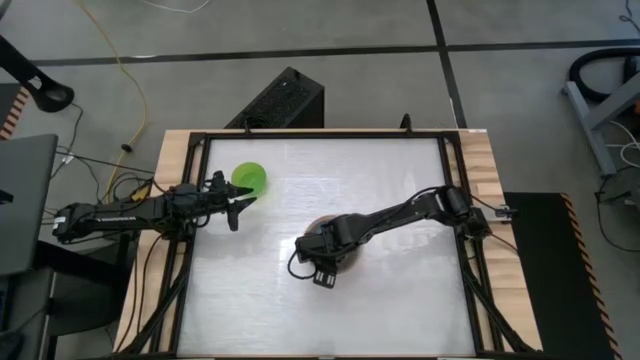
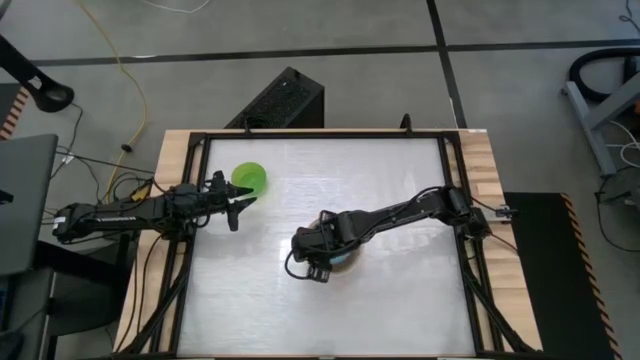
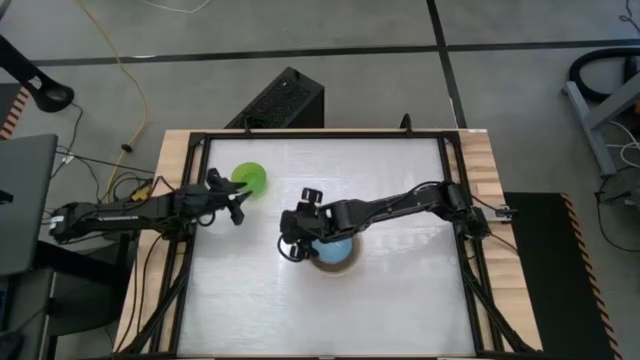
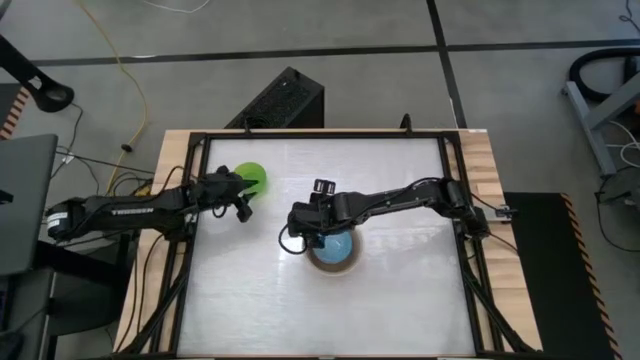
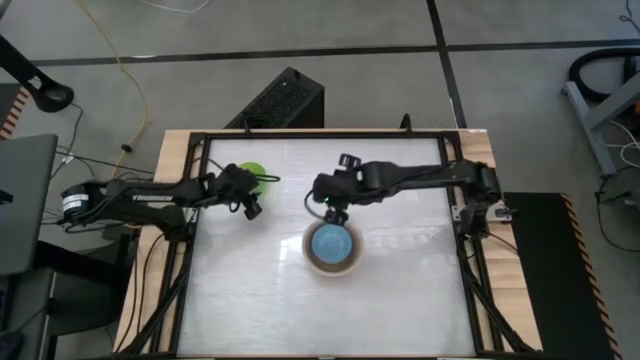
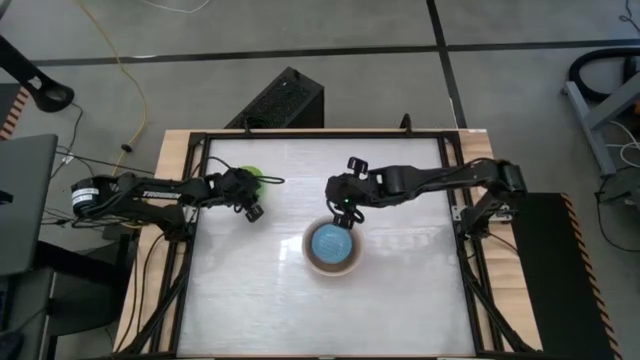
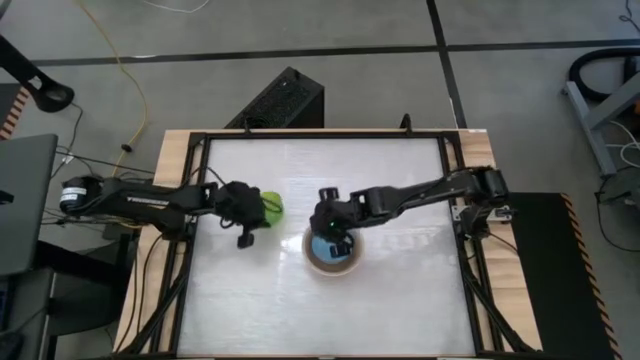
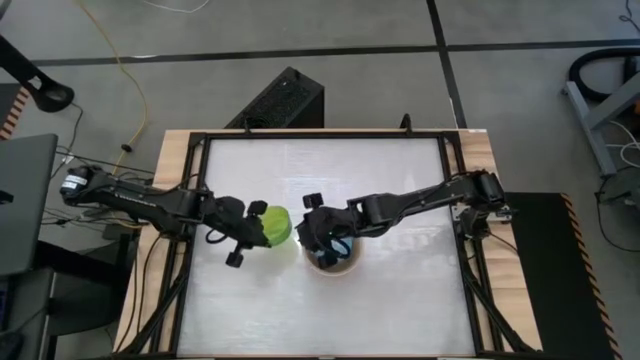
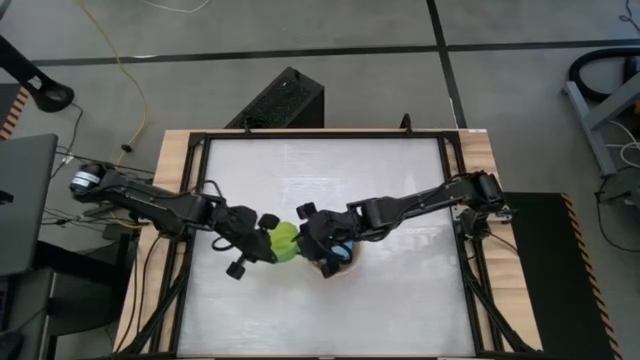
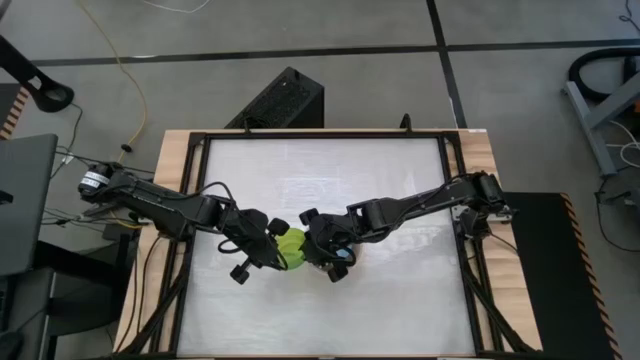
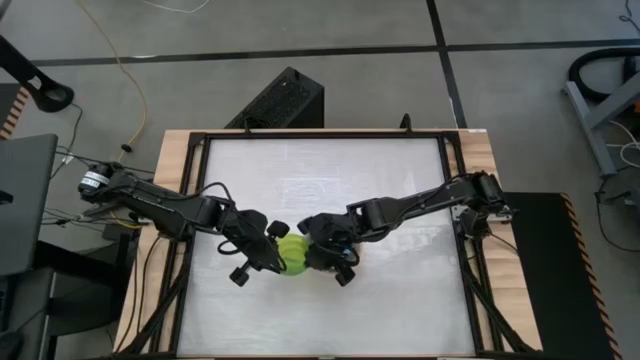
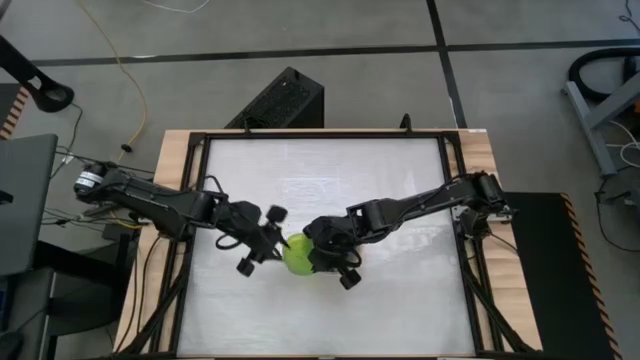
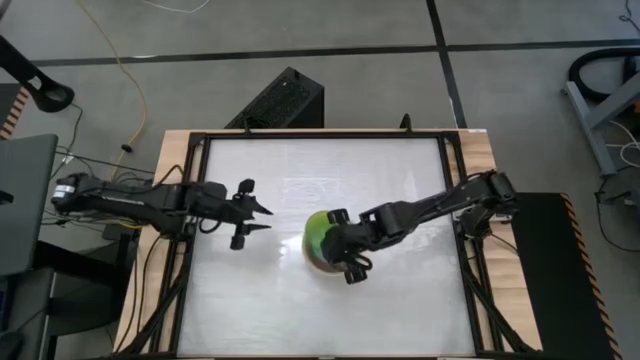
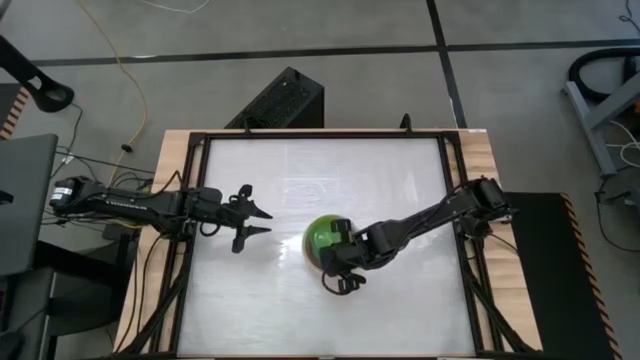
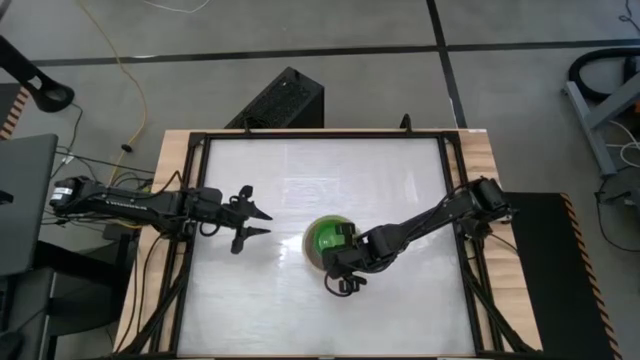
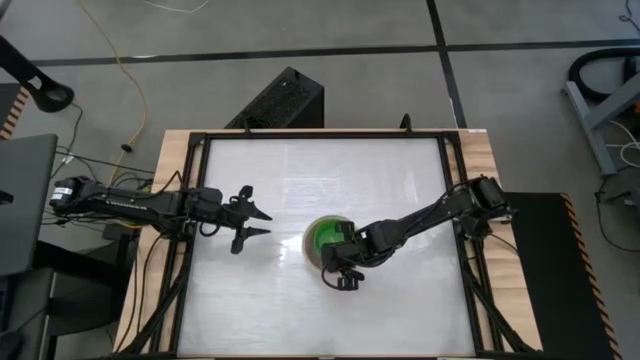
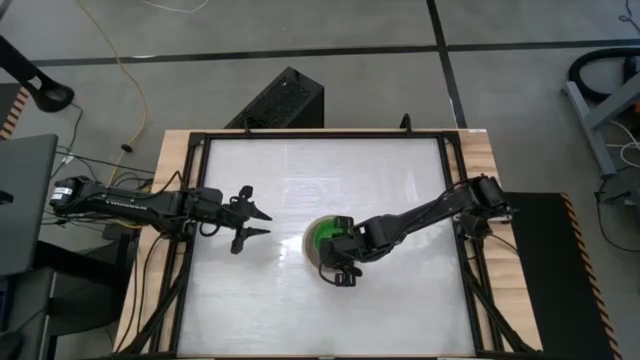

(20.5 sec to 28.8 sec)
Stack the green bowl on top of the blue bowl

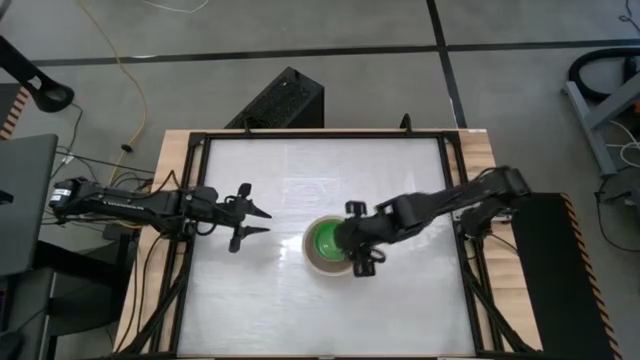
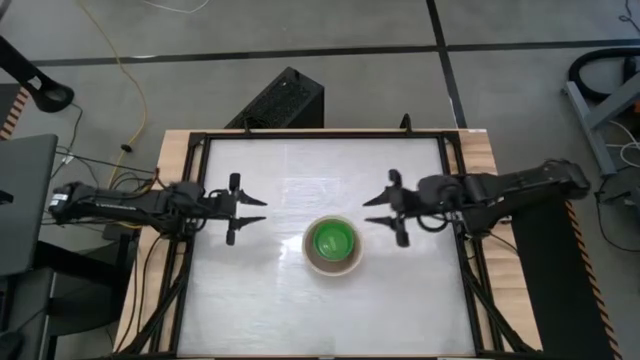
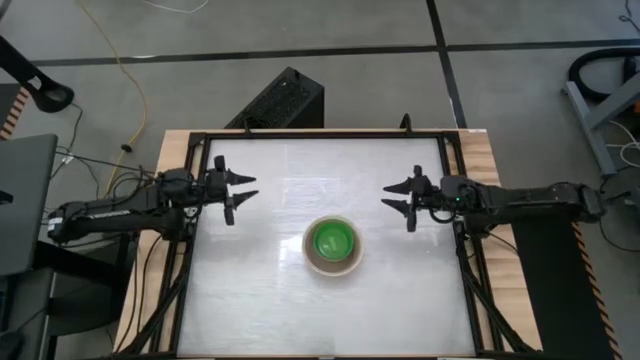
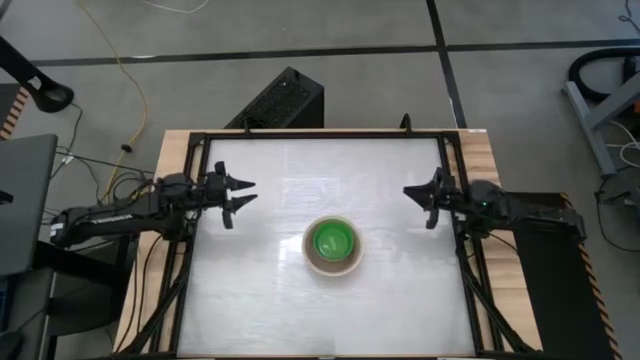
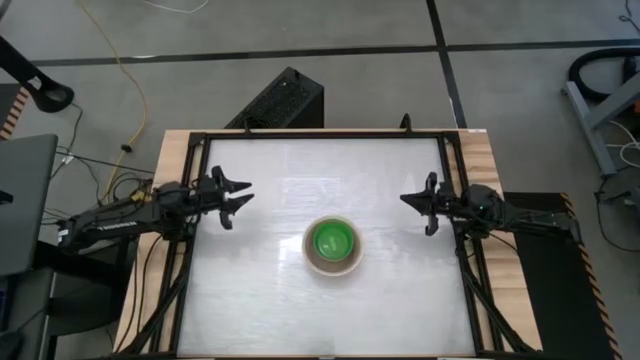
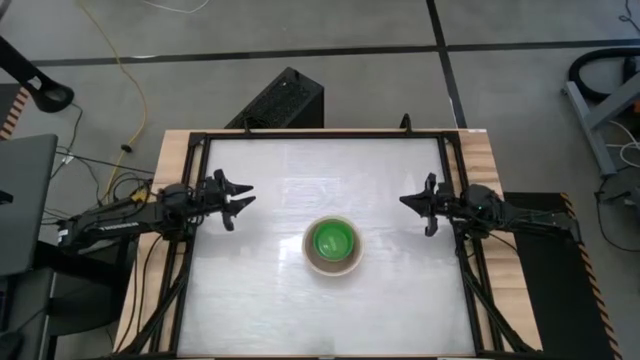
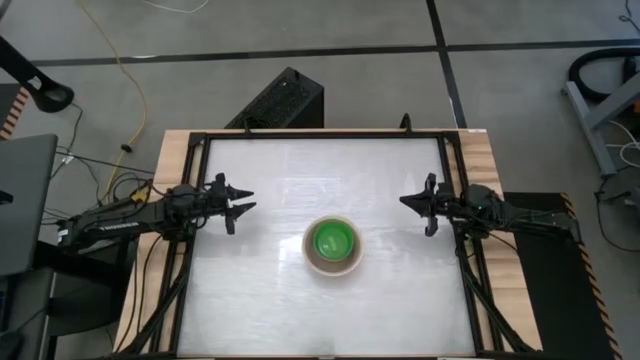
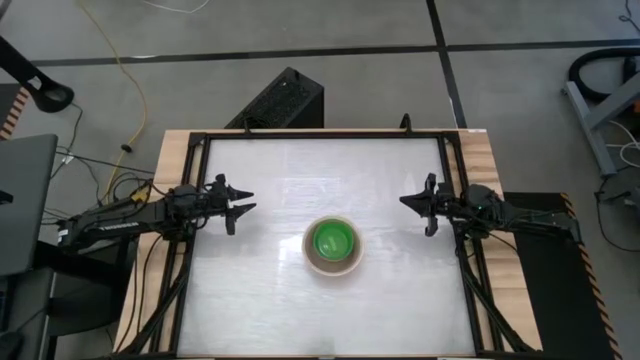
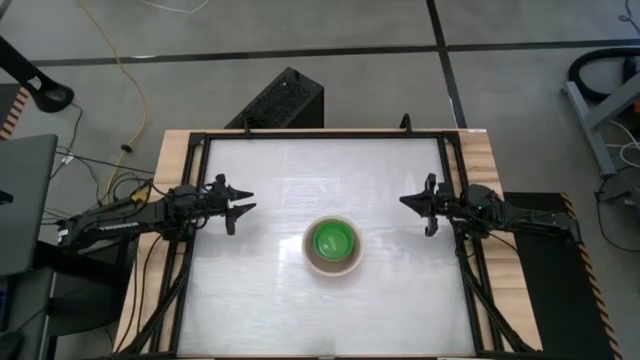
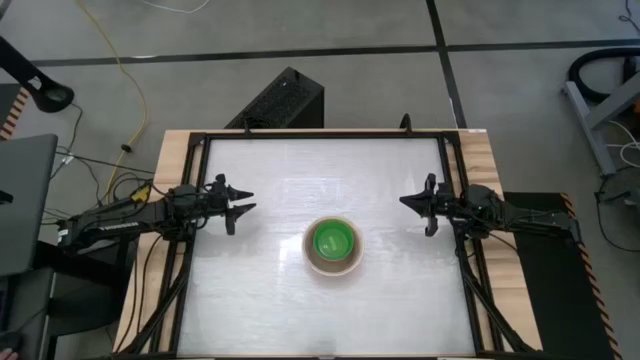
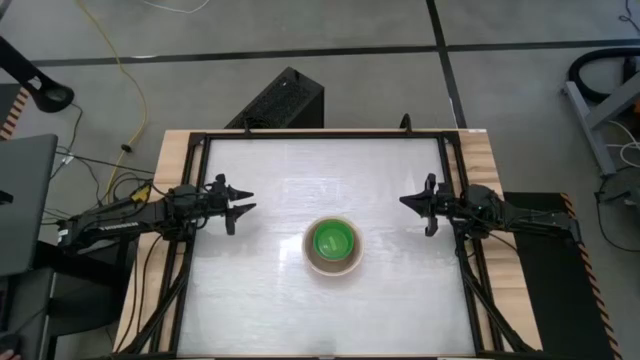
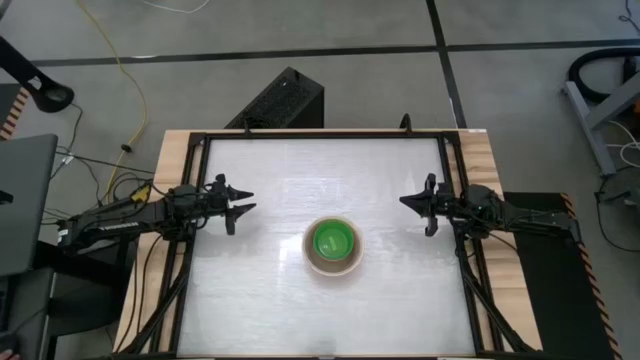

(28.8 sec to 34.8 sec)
Return to Home Position
